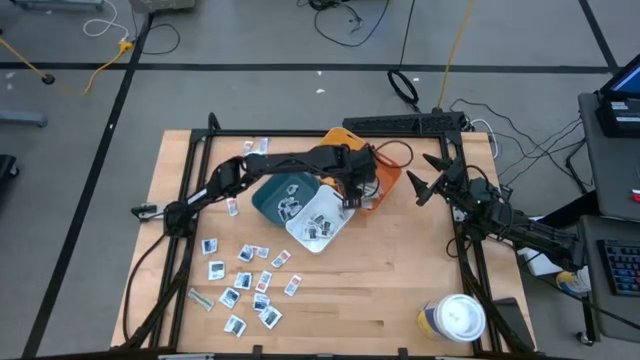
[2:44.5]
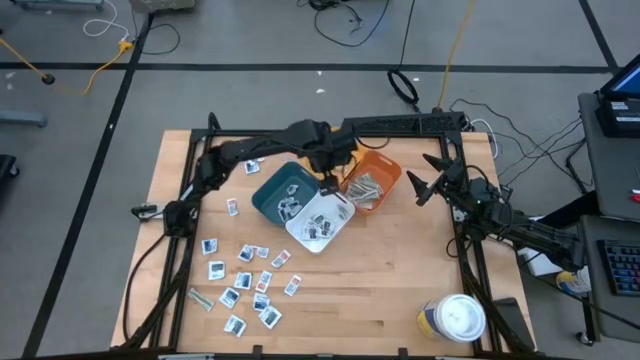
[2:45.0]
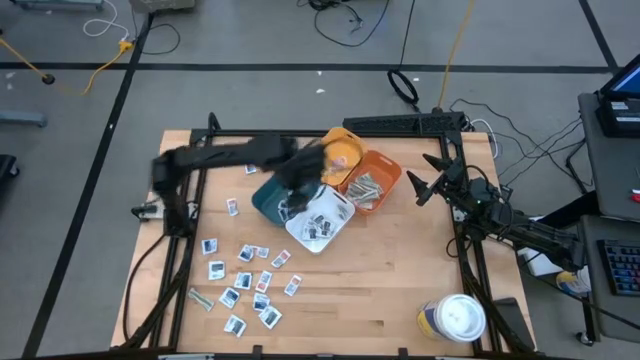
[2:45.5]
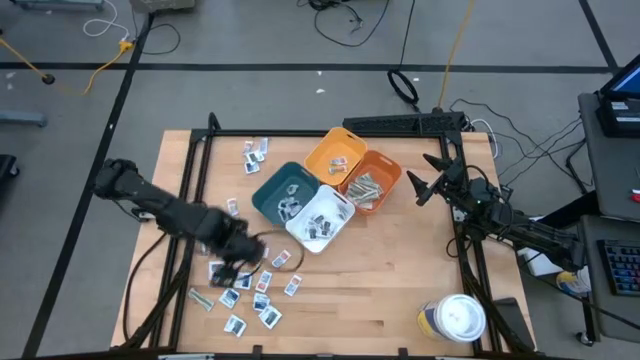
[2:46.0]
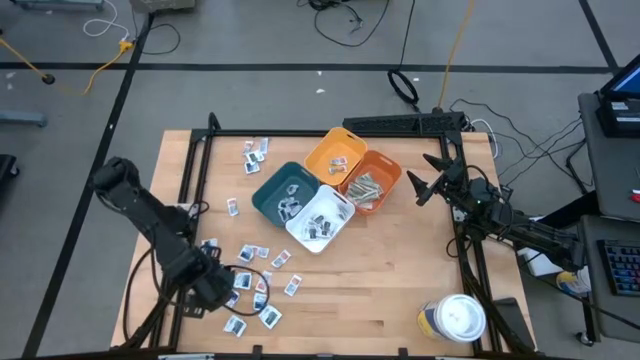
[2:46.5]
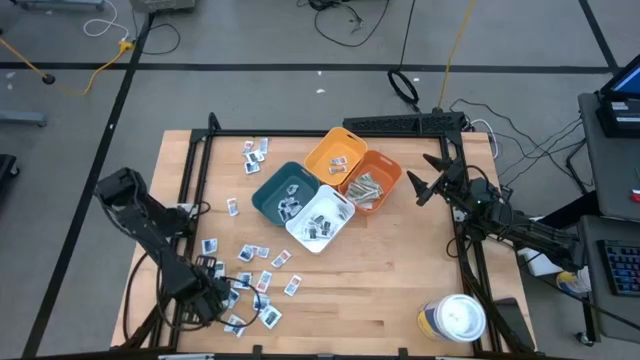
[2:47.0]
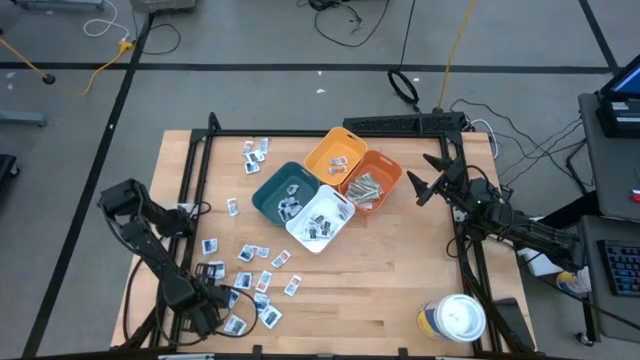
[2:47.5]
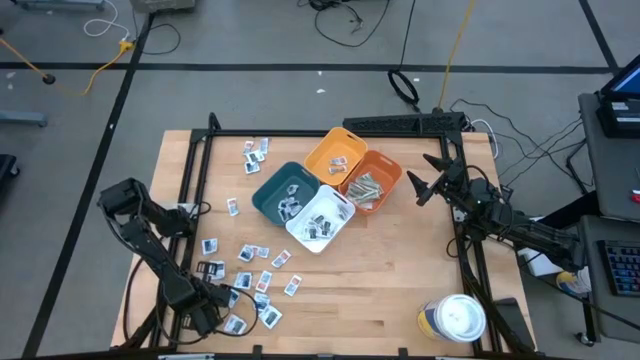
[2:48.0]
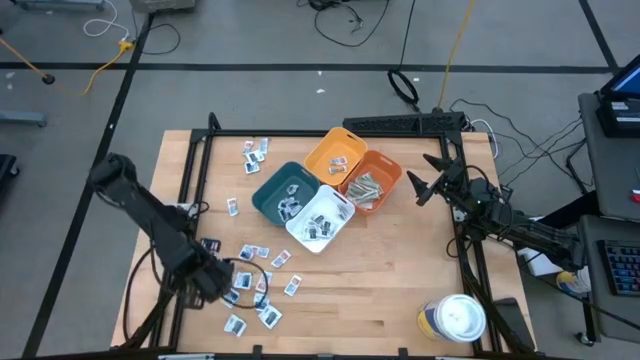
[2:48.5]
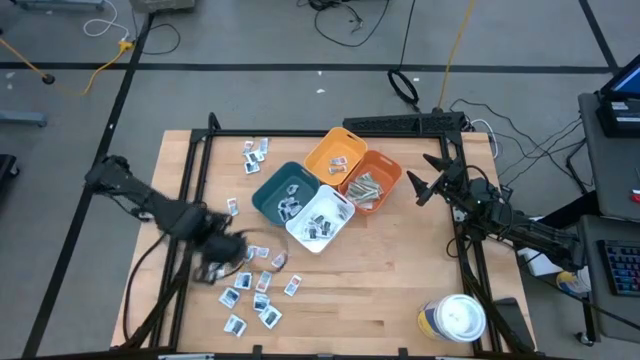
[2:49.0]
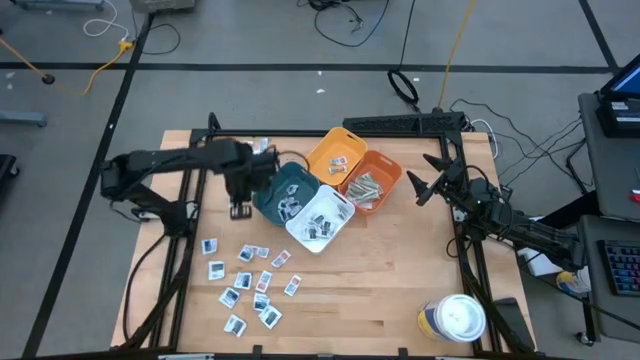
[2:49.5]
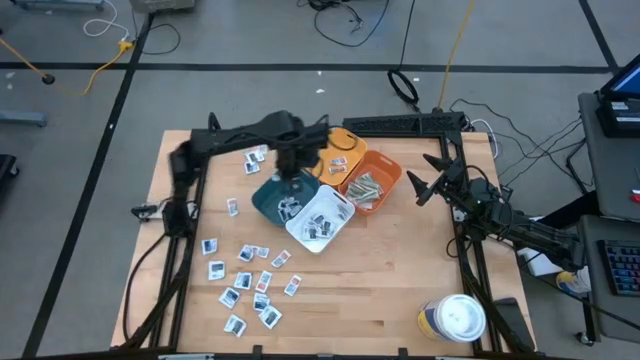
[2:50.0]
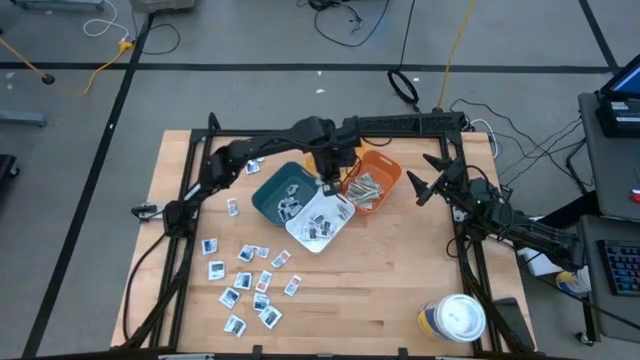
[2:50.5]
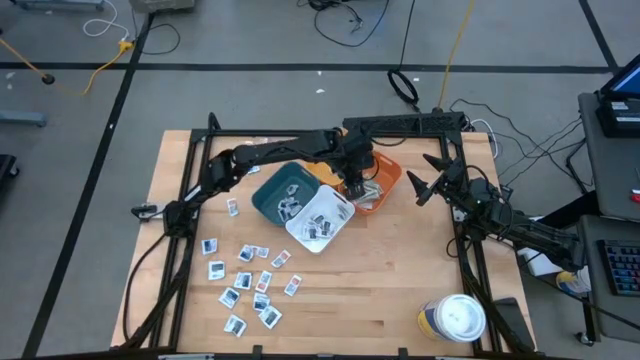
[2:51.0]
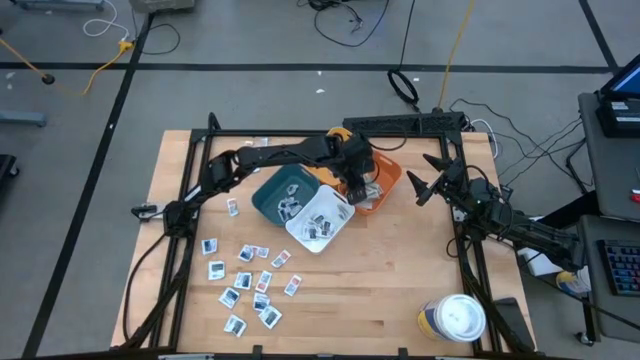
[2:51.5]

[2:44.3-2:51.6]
Task: Pick & Place First Aid Supplies
Put the green bandage pack into the orange bin

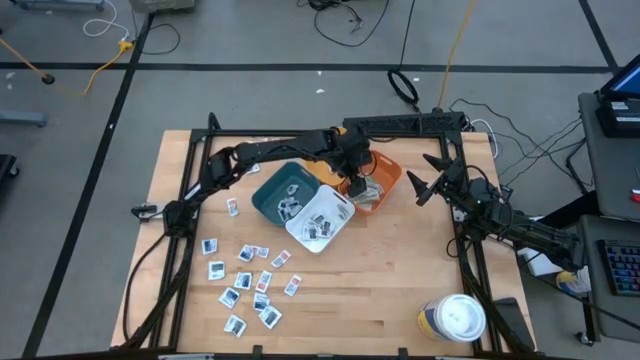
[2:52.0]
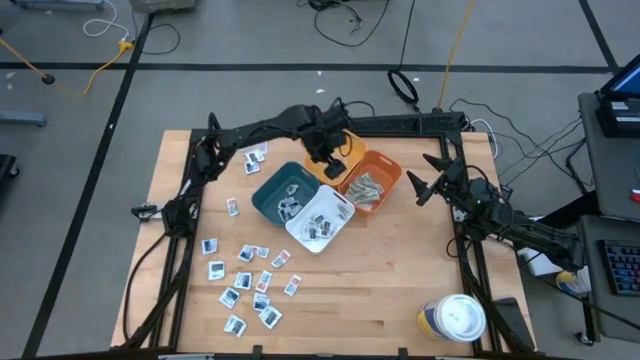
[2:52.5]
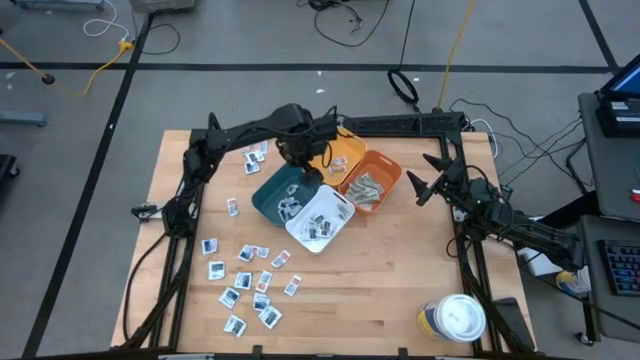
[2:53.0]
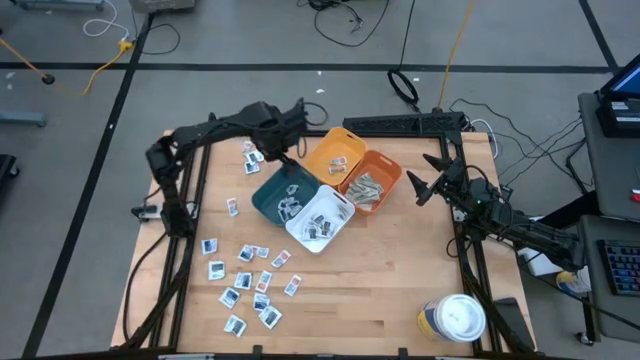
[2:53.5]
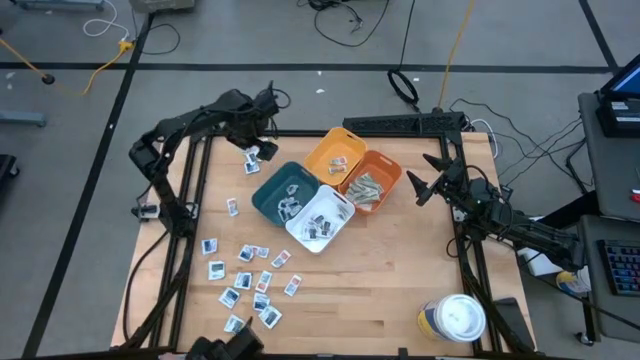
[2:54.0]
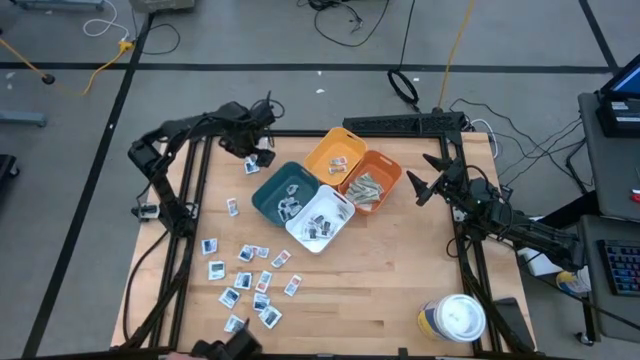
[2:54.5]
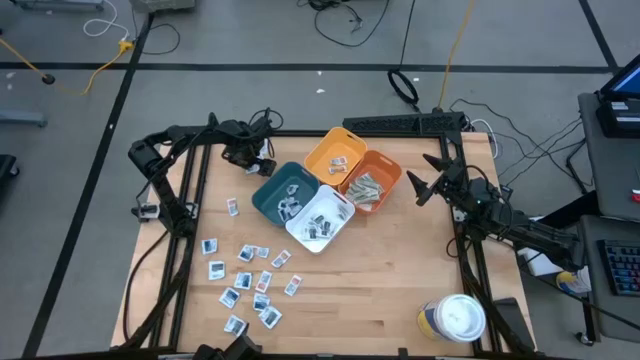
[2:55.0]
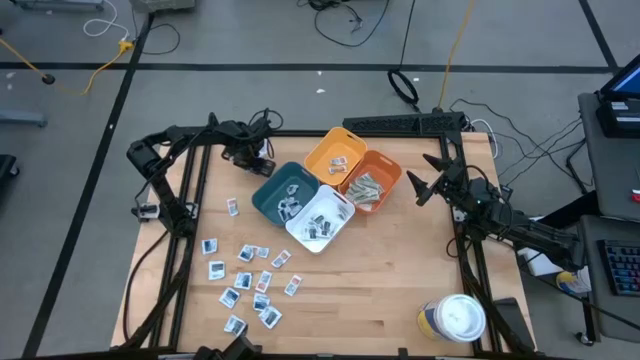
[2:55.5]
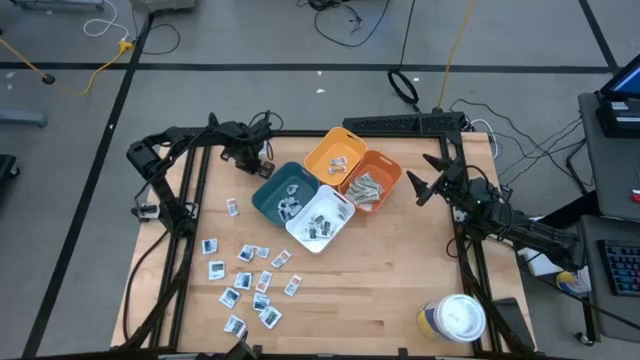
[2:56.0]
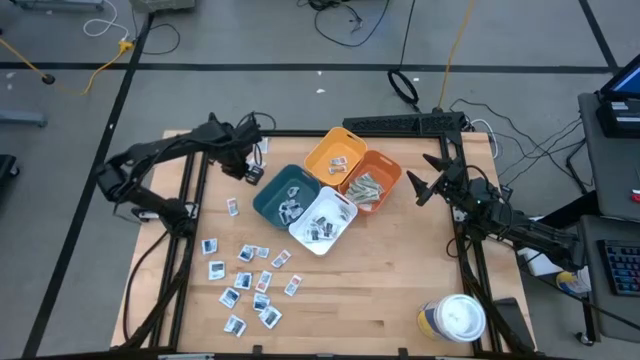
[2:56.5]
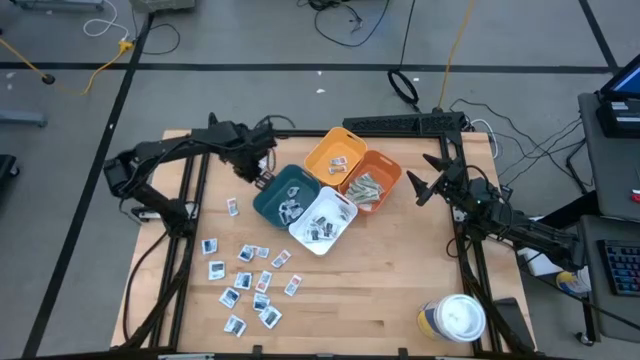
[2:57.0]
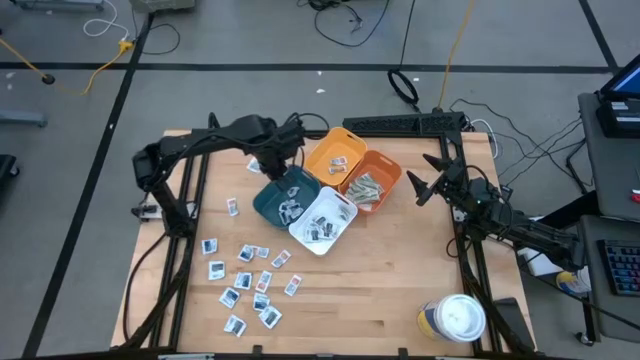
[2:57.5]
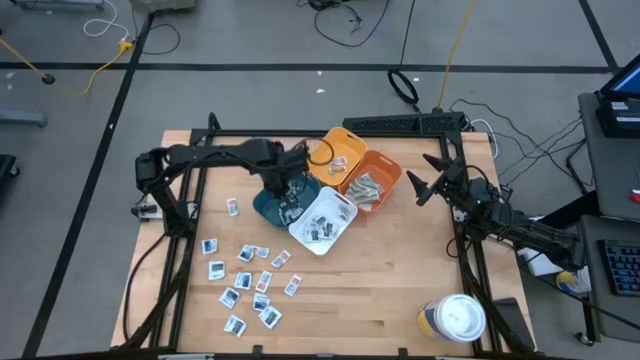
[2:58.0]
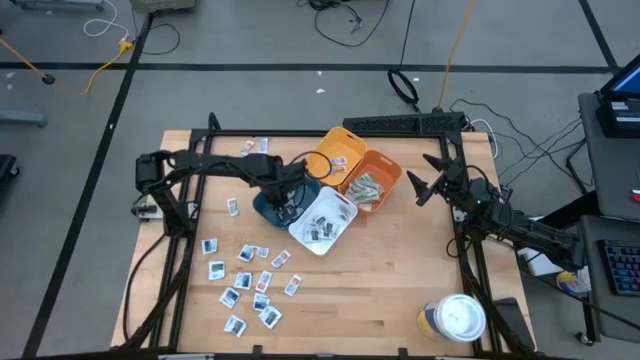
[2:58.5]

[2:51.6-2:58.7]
Put the blue alcohol pad into the blue bin

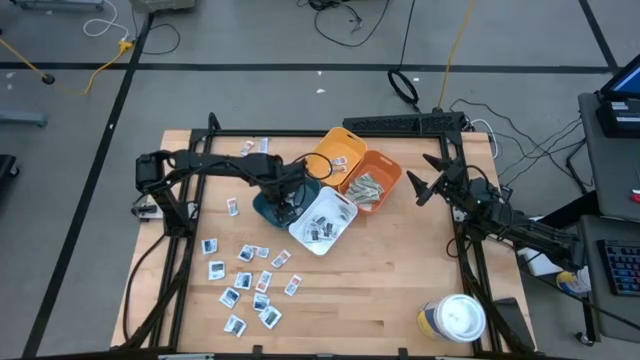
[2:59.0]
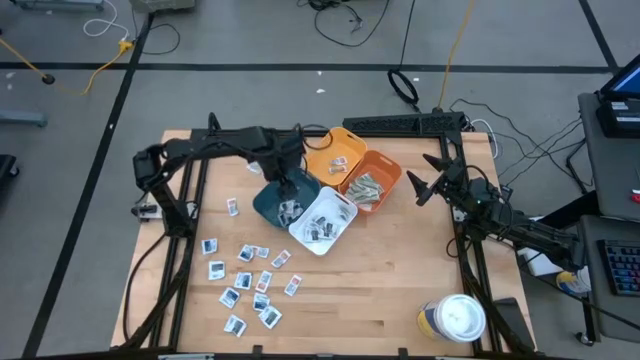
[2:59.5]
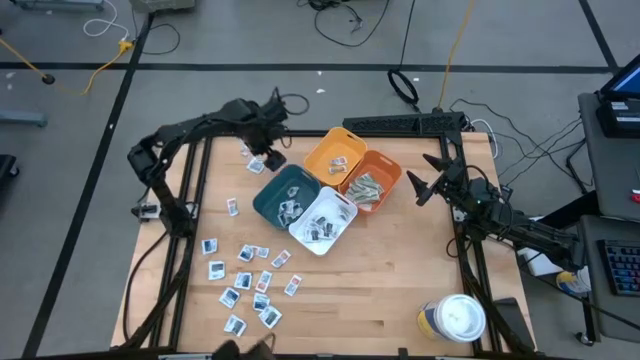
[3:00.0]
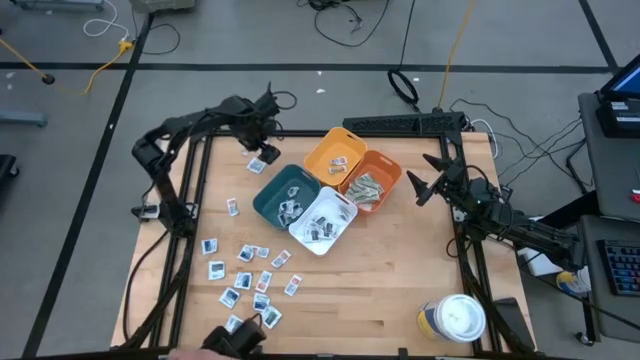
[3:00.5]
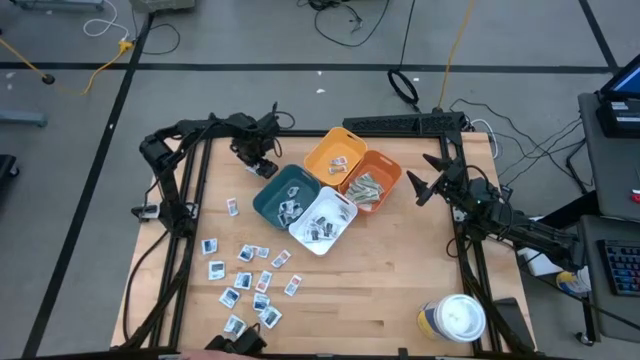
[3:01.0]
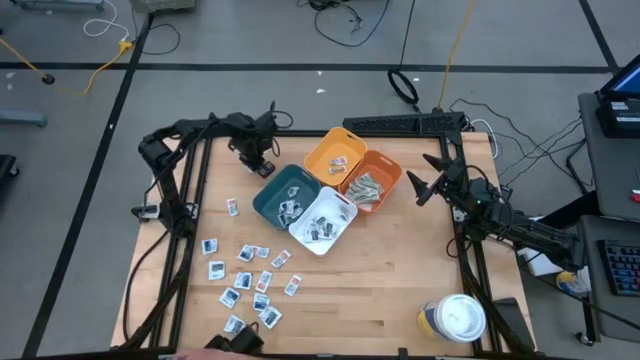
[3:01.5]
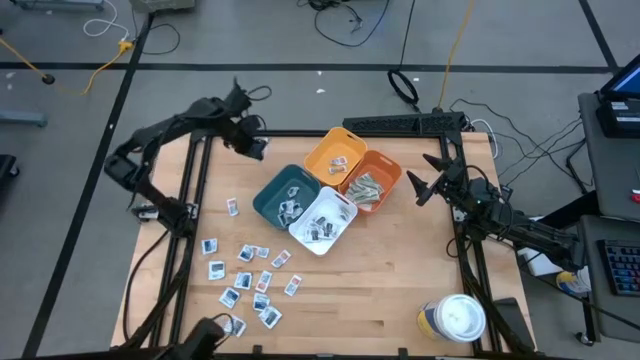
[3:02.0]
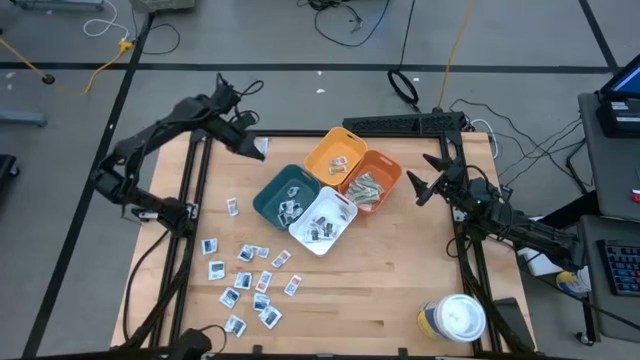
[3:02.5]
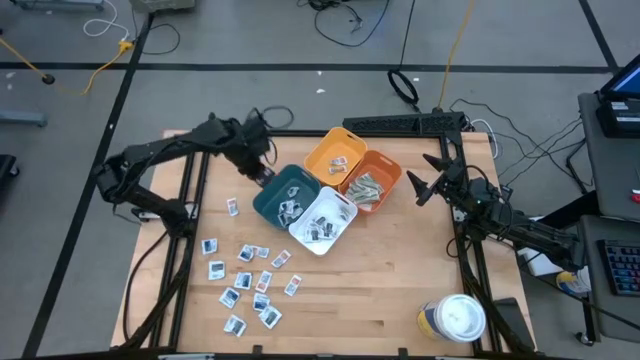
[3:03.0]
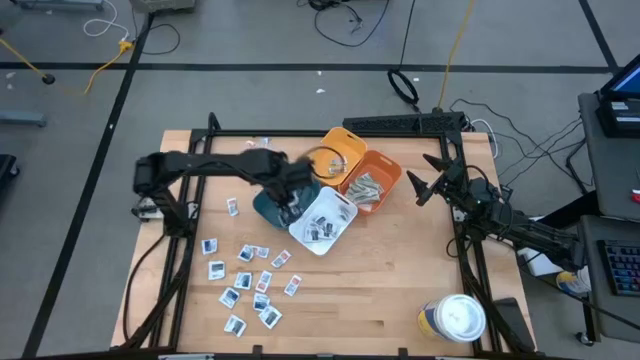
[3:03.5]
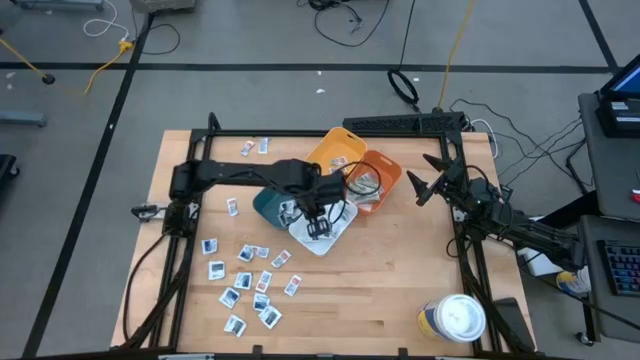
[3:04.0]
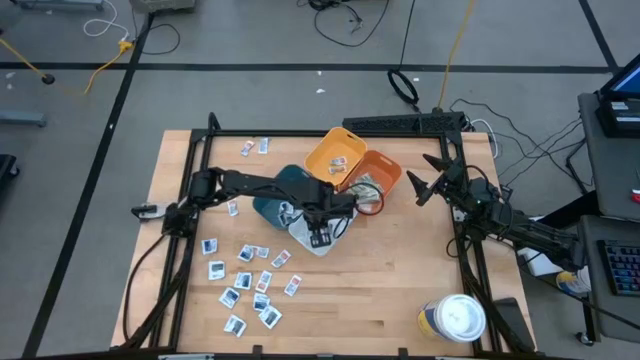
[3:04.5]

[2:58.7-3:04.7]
Put the black towelette pack into the white bin

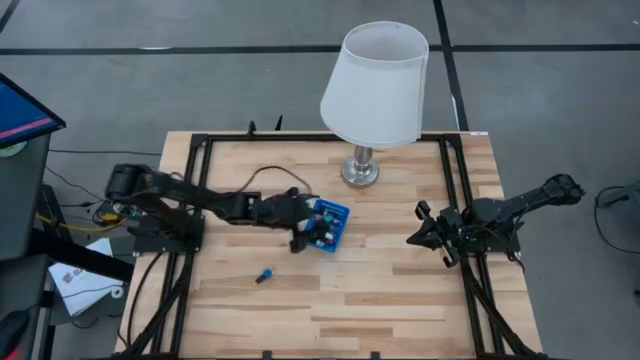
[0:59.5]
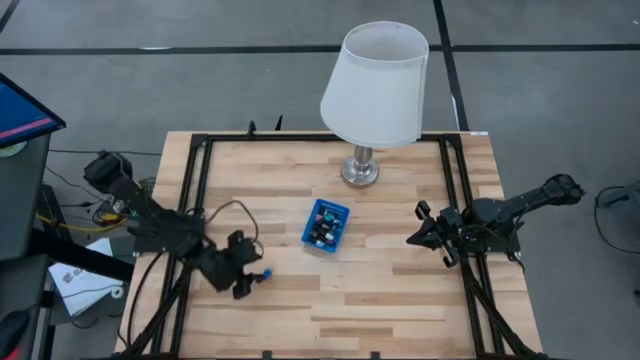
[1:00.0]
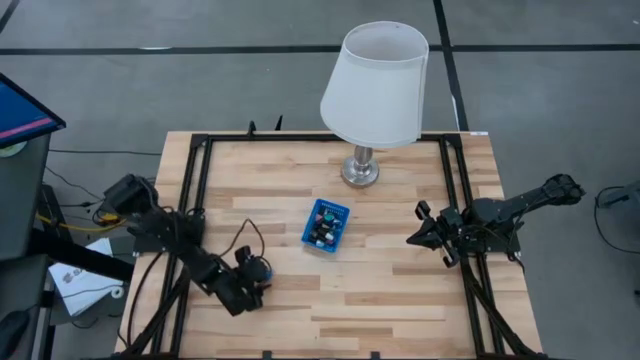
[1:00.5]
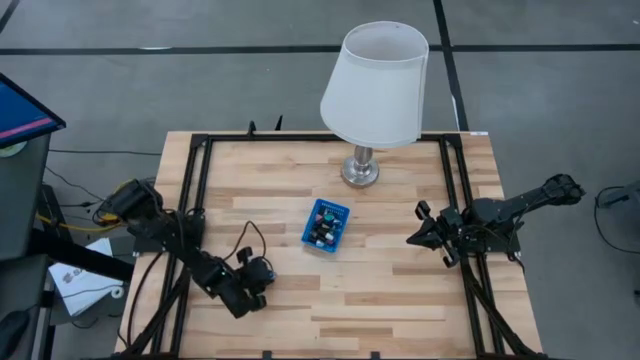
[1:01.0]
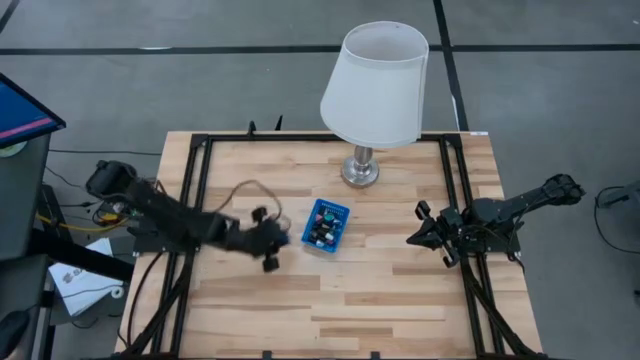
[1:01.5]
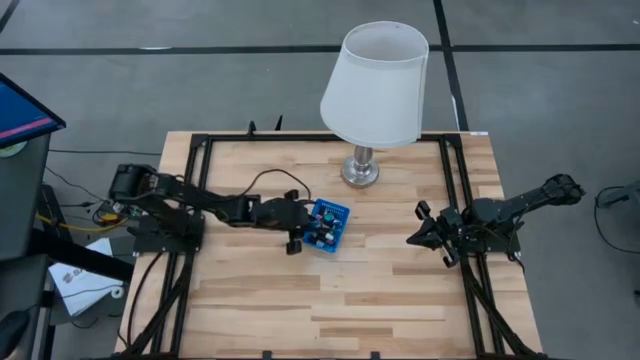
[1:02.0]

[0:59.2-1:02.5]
Task: Pick & Place Nail Polish
Put the blue nail polish into the blue basket
